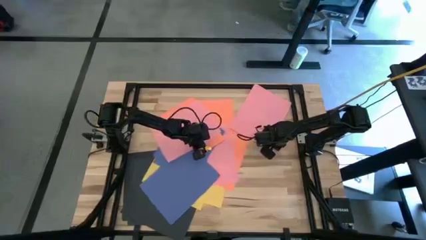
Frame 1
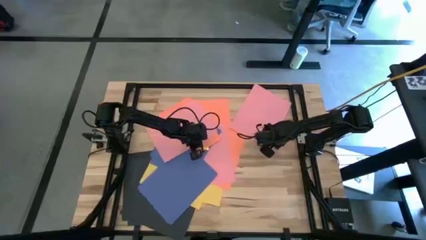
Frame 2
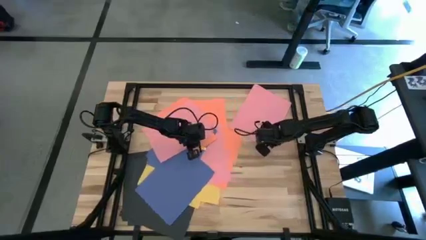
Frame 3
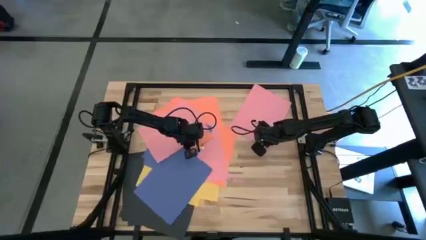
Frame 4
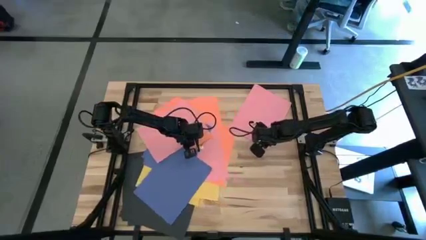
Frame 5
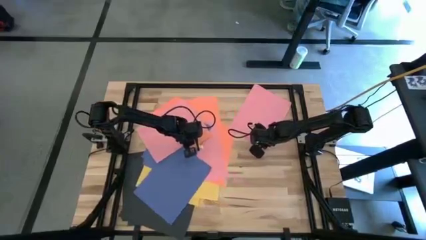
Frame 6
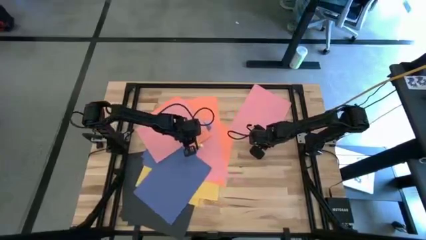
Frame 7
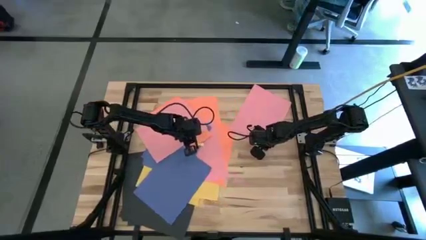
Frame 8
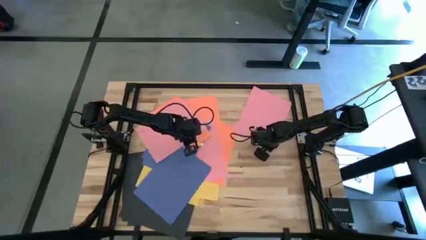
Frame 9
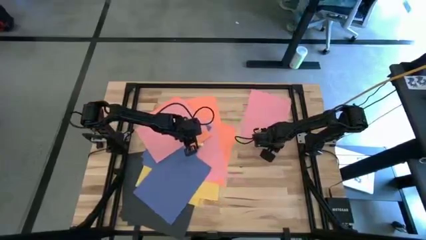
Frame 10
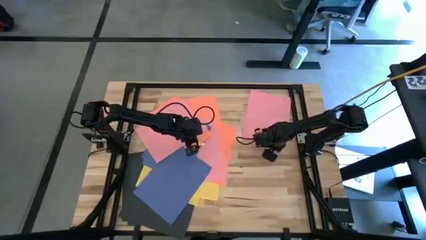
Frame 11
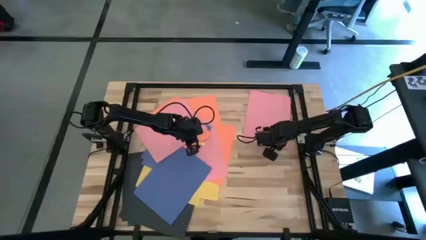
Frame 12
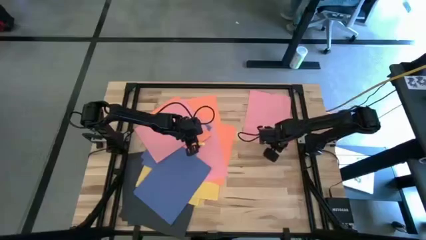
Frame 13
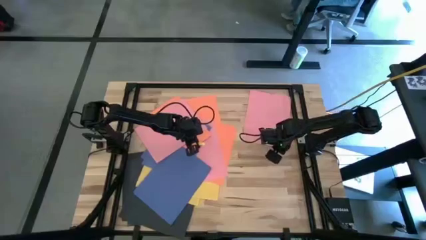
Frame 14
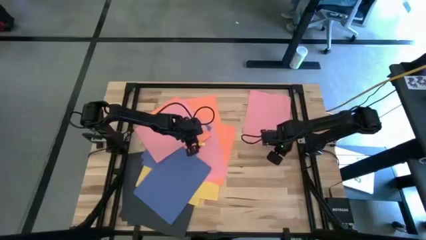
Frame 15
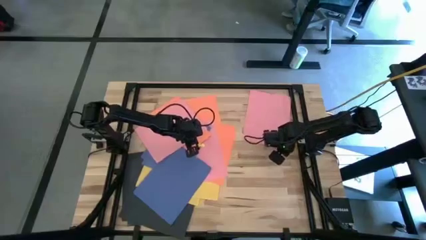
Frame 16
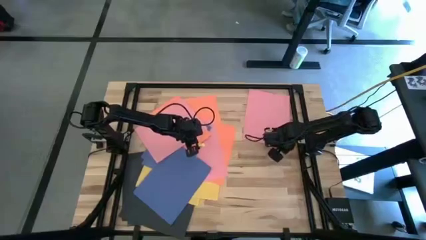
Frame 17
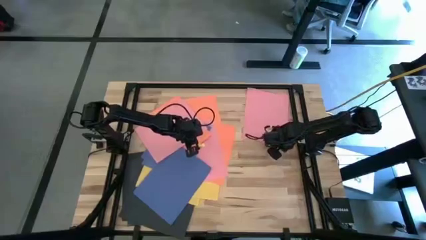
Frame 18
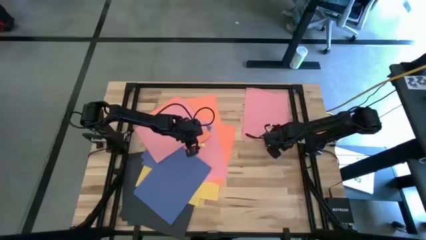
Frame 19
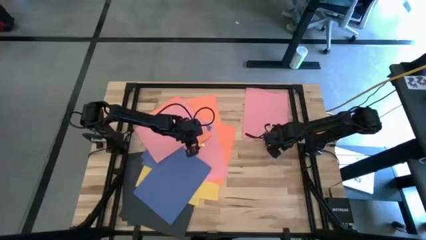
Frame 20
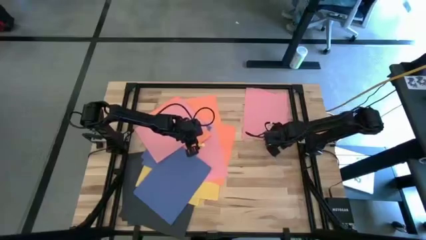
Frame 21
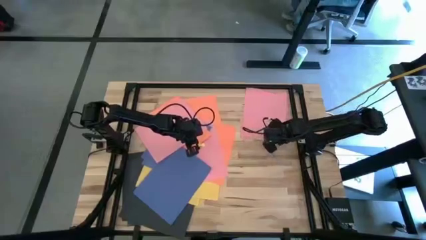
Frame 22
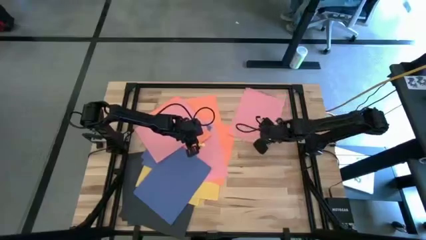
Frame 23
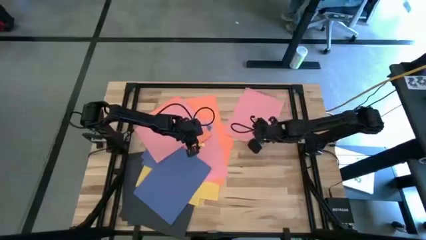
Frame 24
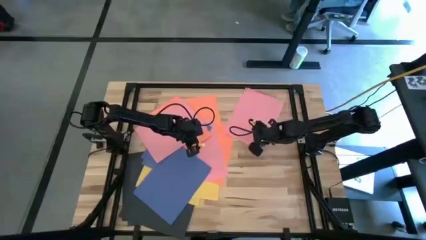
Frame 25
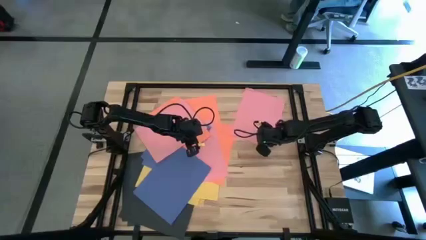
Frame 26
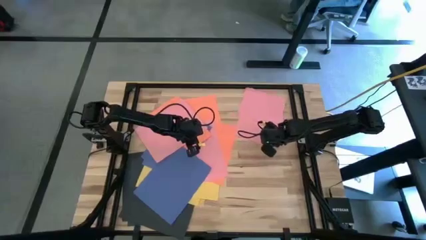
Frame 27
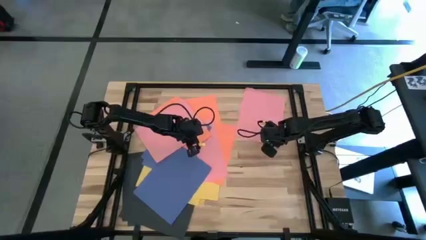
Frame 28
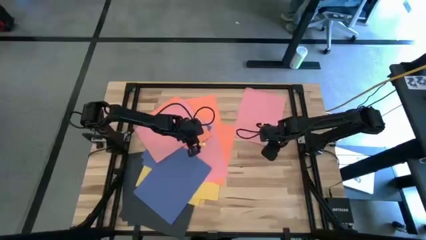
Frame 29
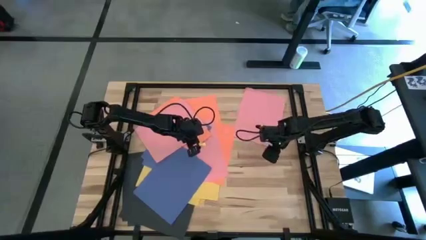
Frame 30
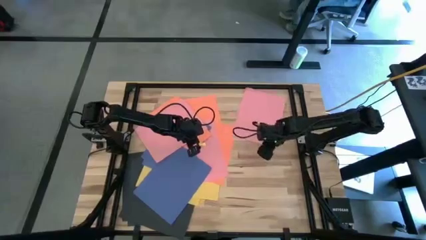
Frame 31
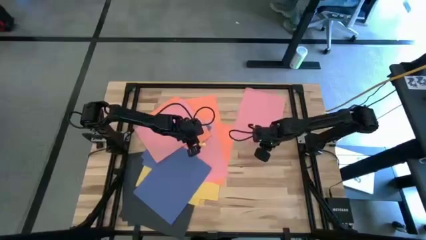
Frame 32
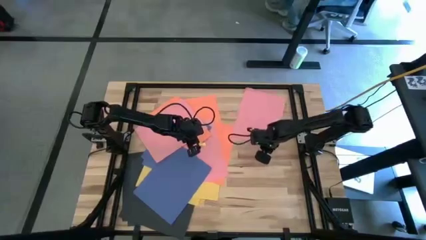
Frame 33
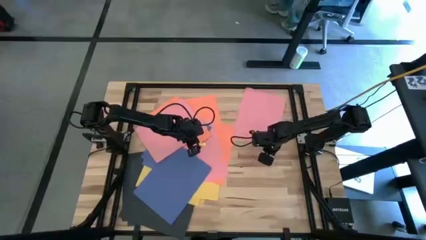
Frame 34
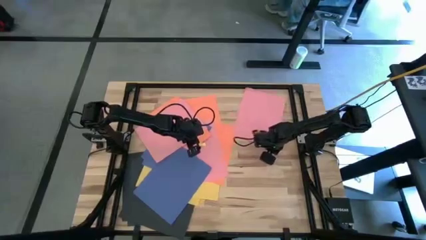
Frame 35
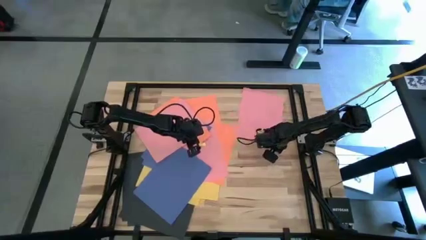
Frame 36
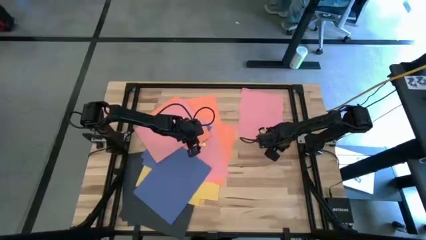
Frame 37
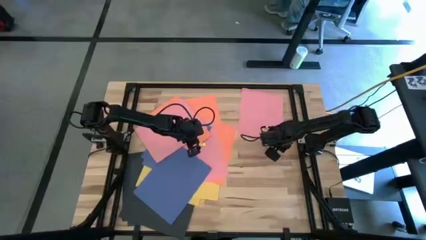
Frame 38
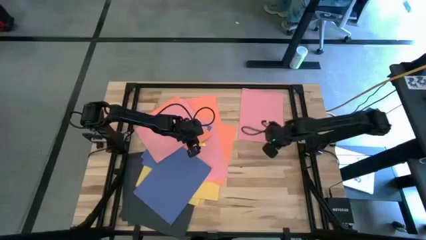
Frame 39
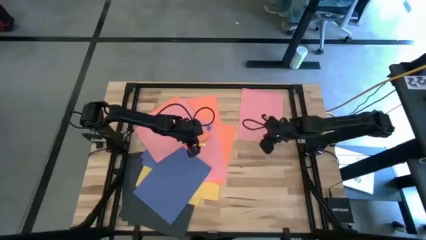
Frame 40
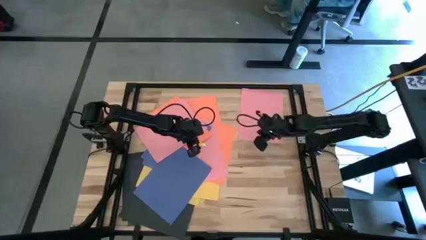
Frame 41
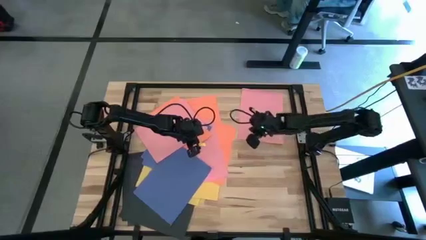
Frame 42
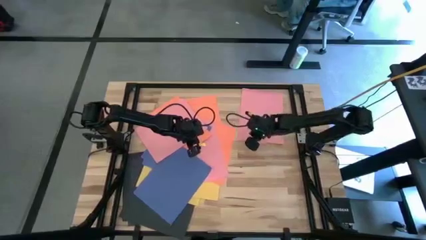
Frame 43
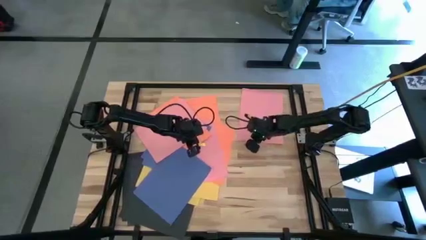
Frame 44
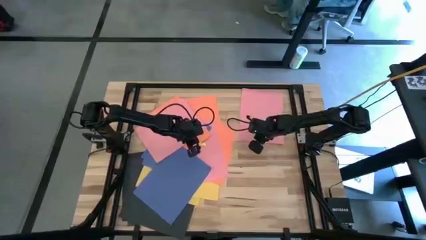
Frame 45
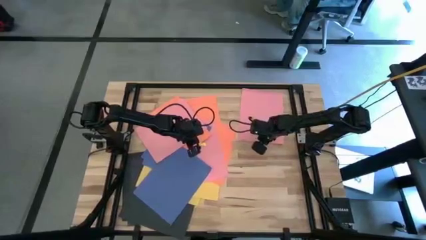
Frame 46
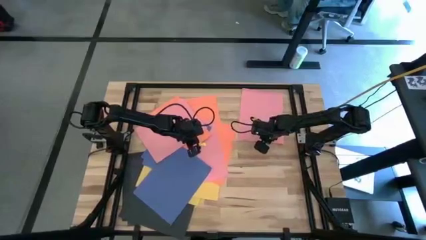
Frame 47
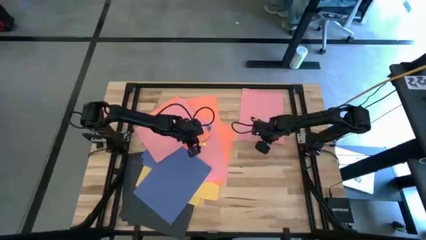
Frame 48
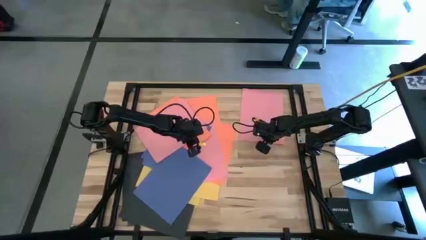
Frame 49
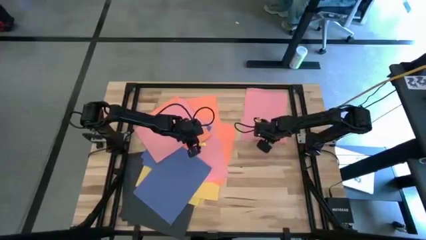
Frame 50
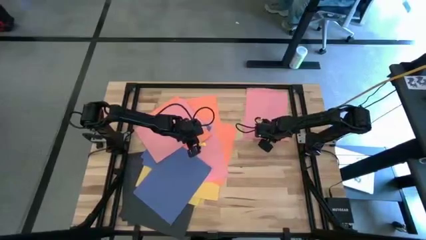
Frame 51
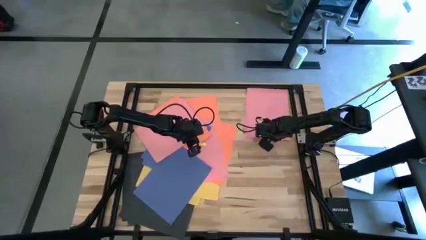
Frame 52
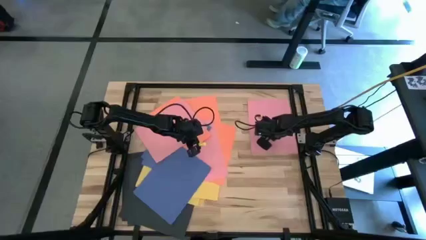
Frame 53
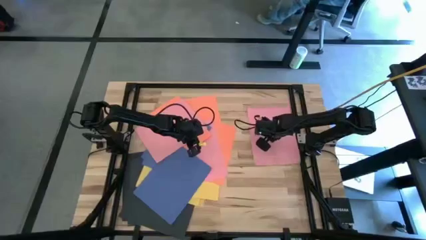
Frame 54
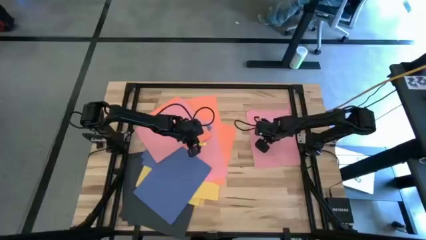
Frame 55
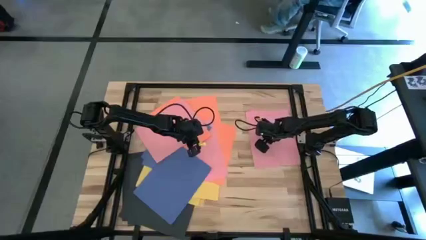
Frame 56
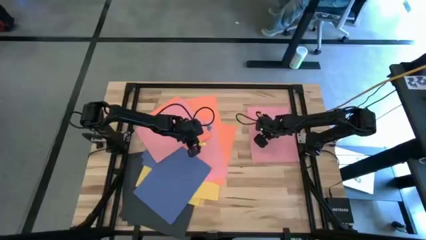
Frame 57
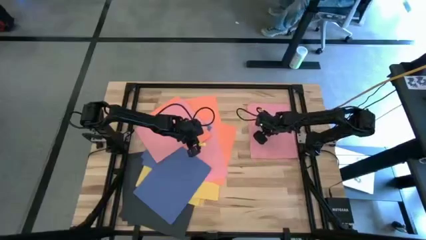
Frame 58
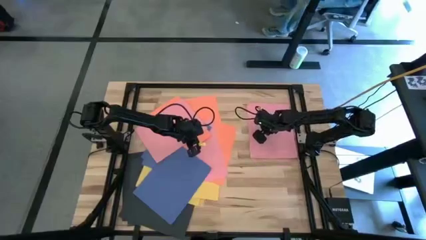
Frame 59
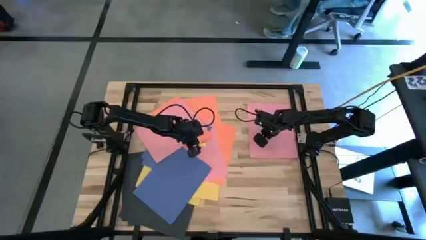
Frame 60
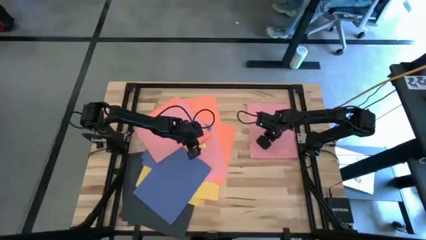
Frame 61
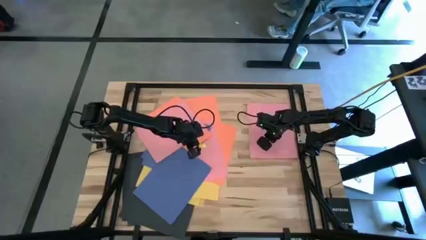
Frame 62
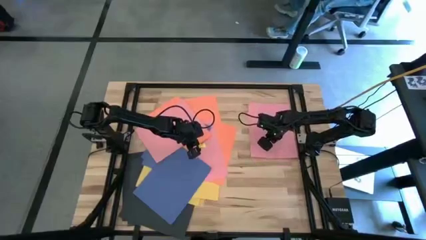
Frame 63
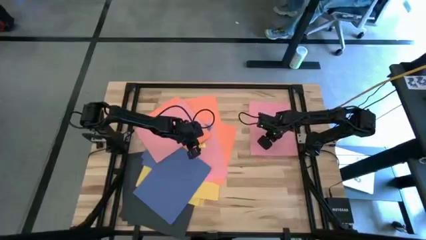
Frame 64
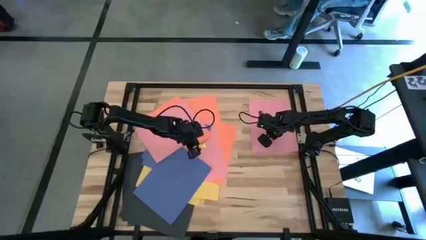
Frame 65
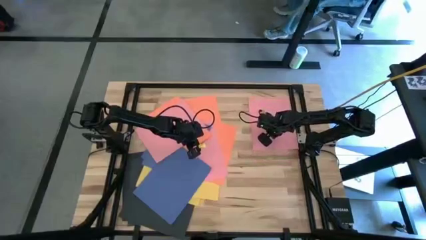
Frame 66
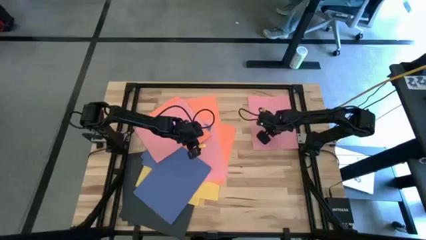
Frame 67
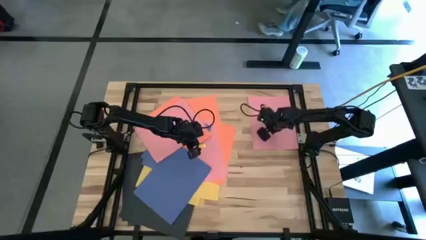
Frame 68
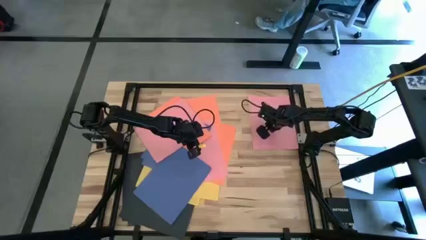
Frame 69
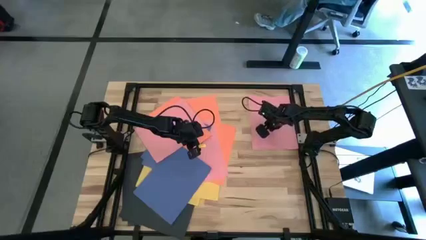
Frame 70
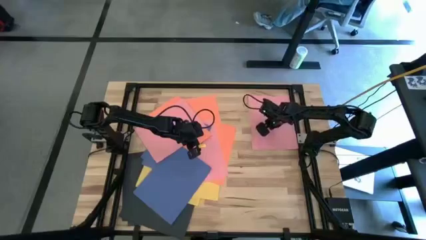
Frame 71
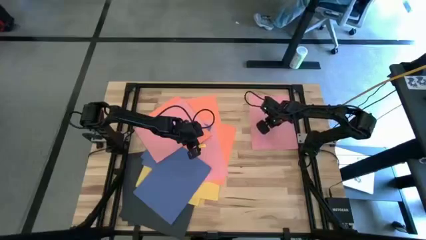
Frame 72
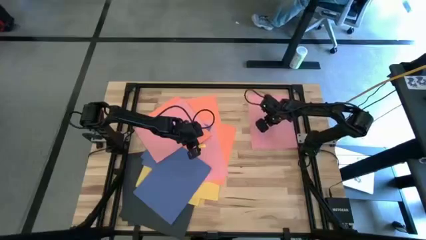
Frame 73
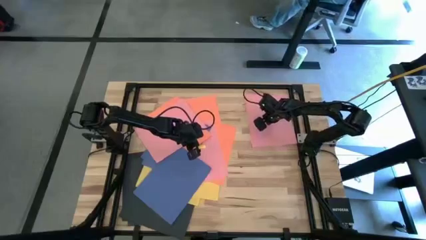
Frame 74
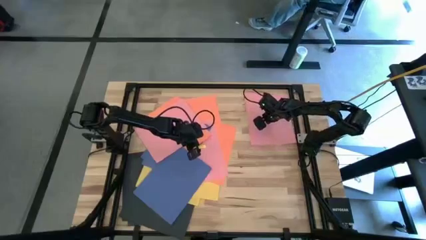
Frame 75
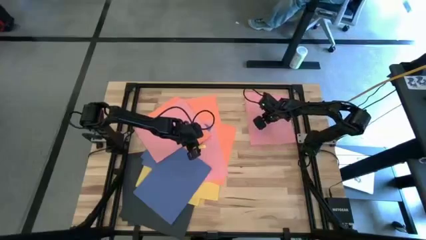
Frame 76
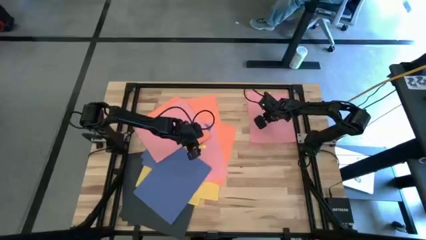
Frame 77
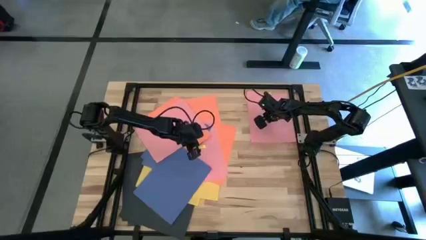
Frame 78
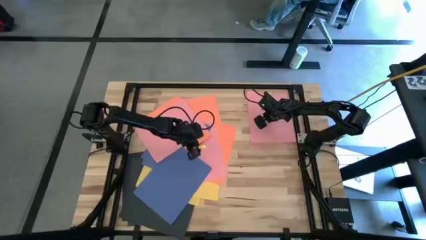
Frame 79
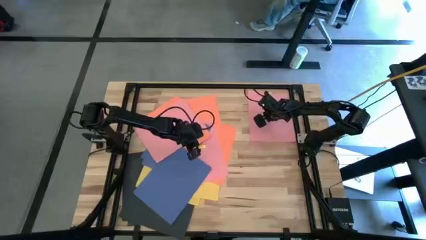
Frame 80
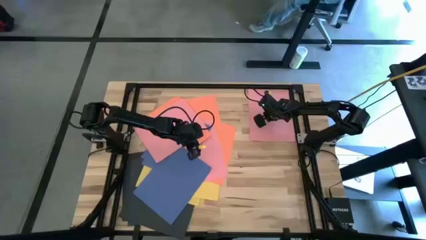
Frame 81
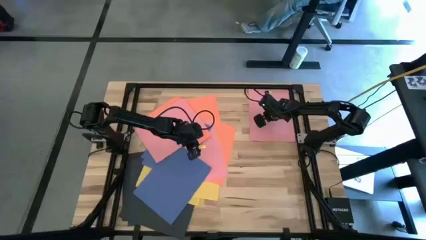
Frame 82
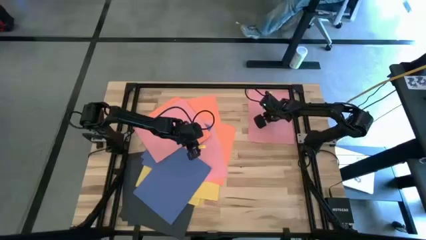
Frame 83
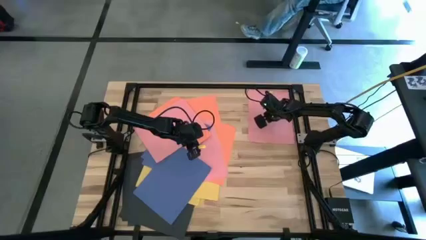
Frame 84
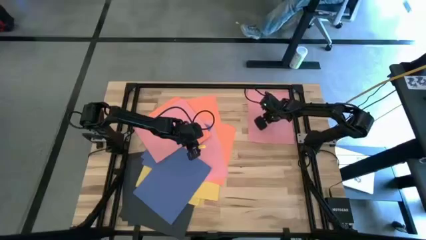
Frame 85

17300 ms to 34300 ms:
Task: Organize paper
Put the pink paper to the top right of the table
